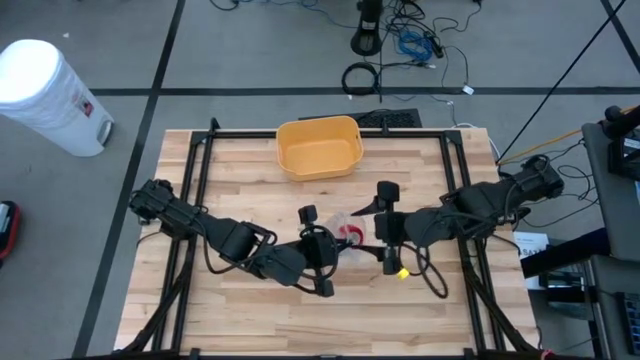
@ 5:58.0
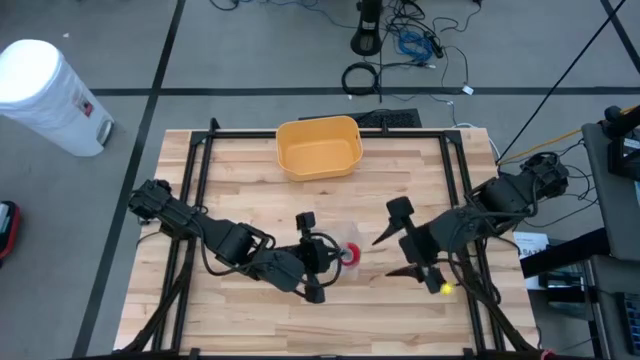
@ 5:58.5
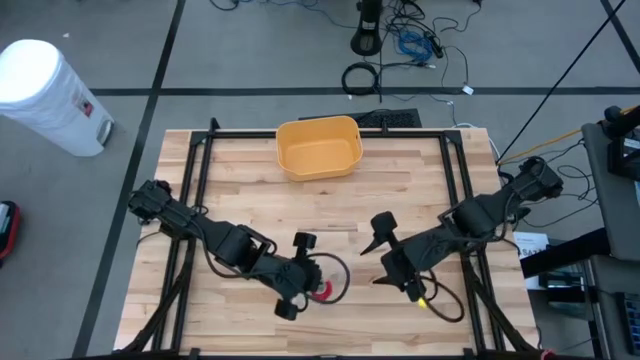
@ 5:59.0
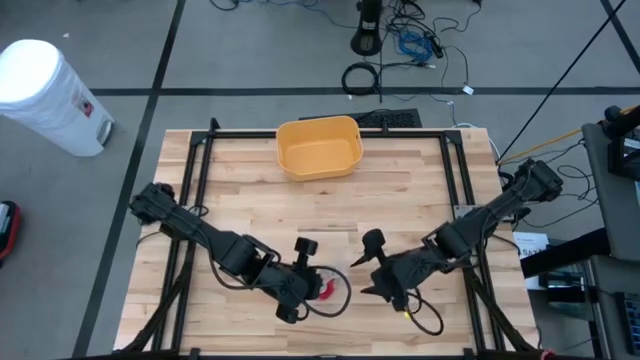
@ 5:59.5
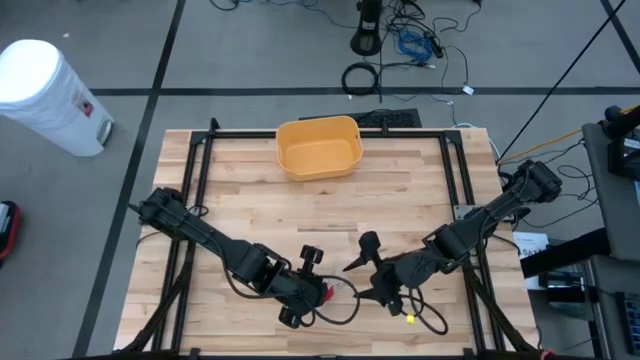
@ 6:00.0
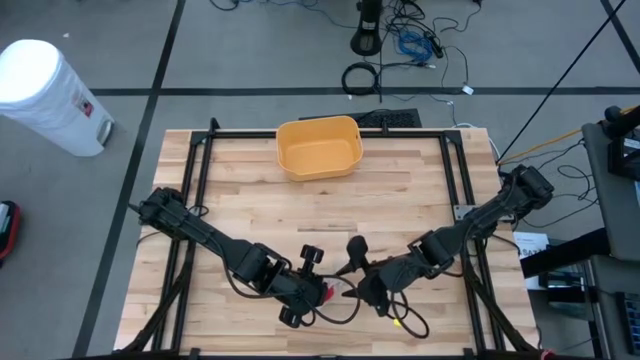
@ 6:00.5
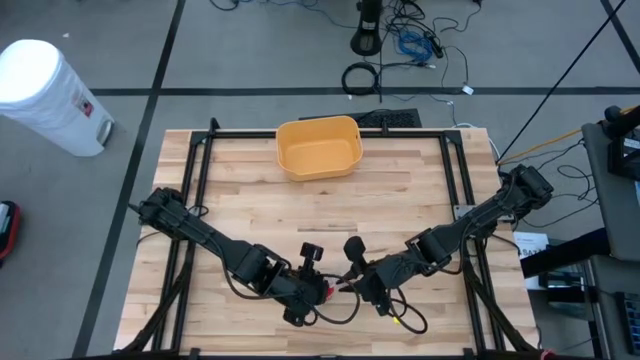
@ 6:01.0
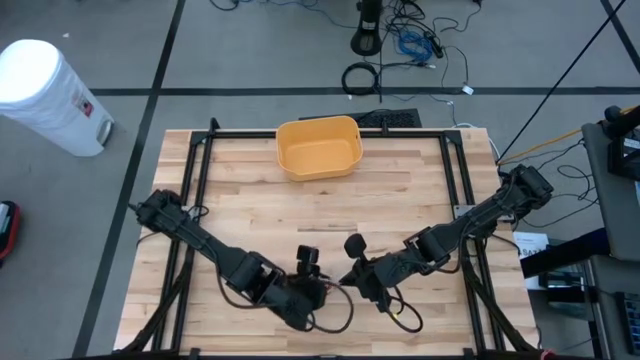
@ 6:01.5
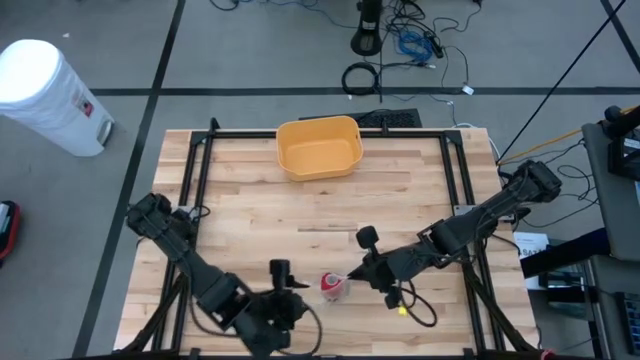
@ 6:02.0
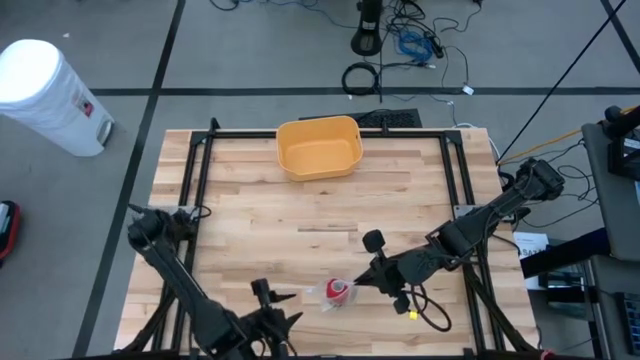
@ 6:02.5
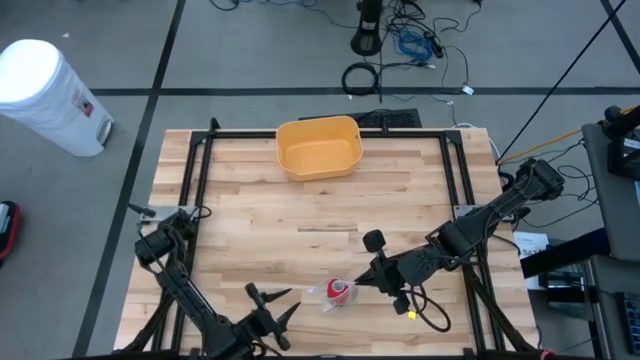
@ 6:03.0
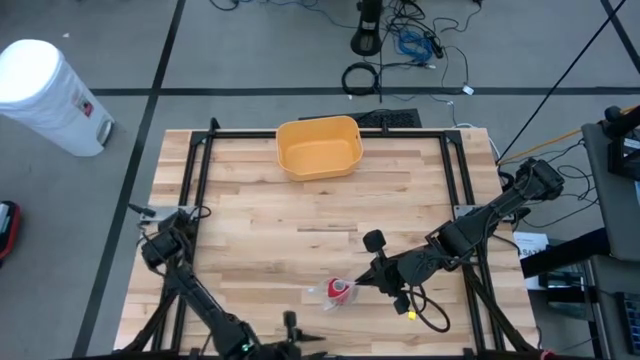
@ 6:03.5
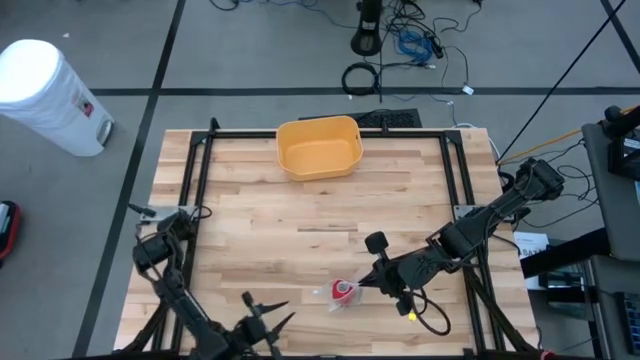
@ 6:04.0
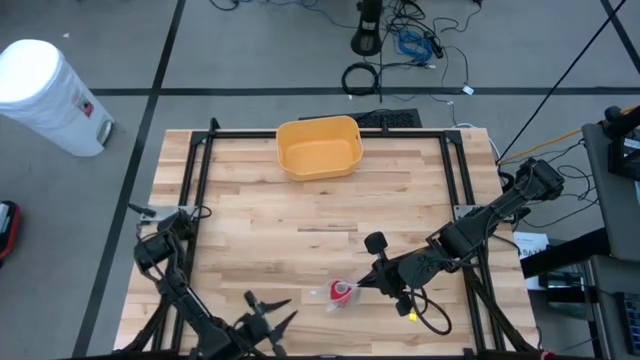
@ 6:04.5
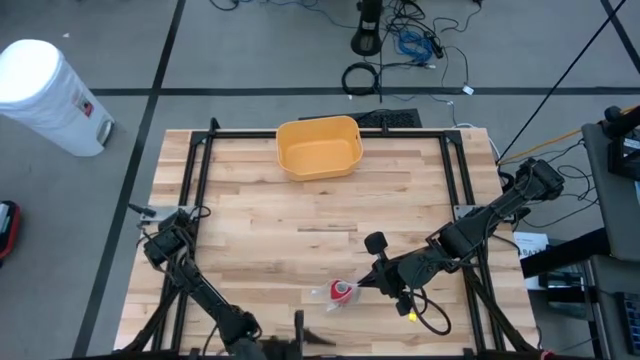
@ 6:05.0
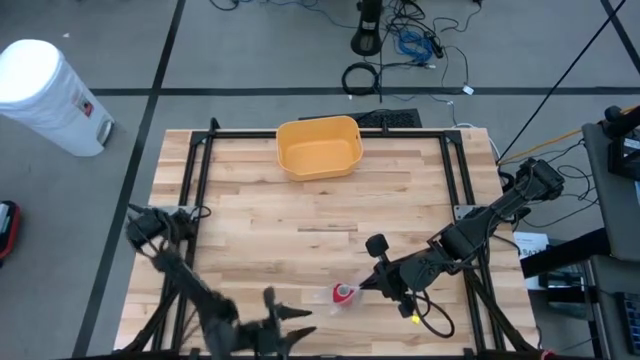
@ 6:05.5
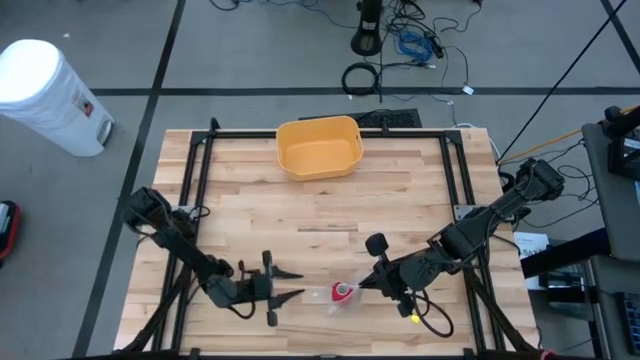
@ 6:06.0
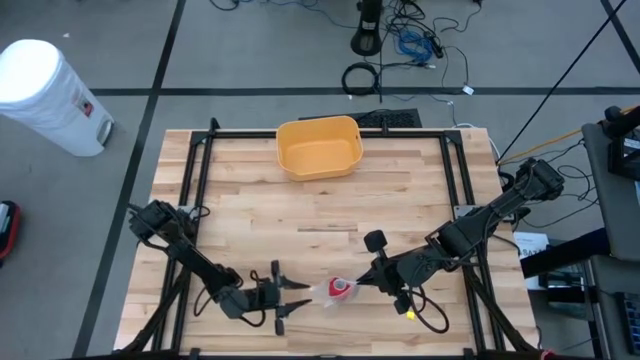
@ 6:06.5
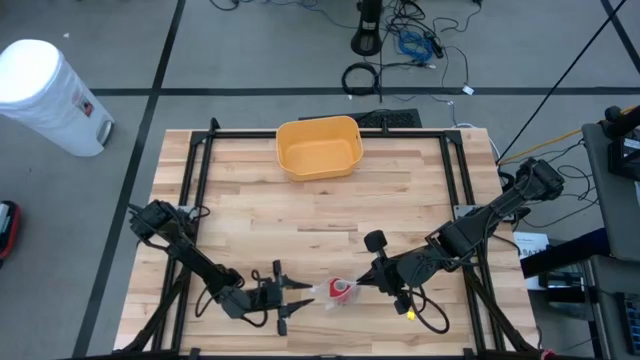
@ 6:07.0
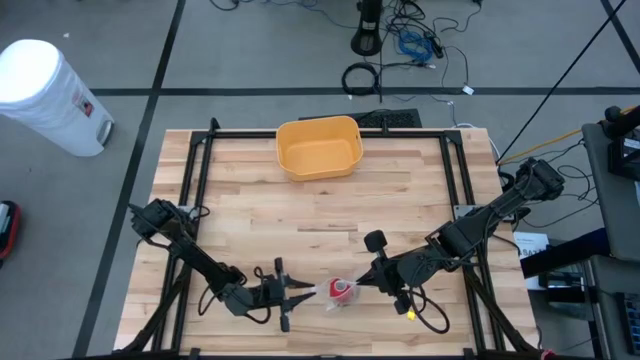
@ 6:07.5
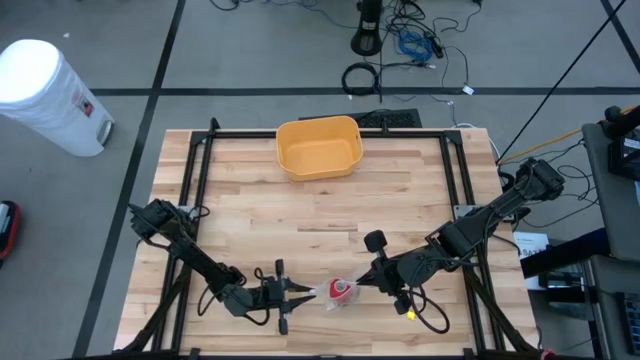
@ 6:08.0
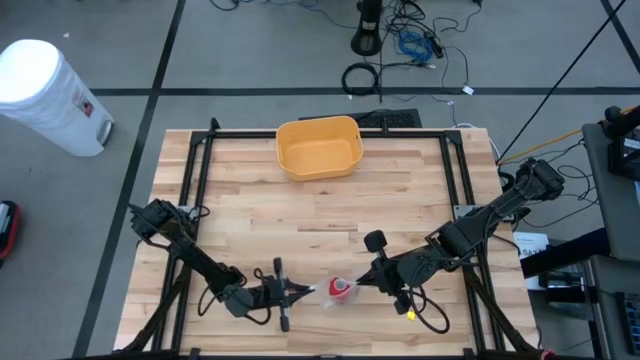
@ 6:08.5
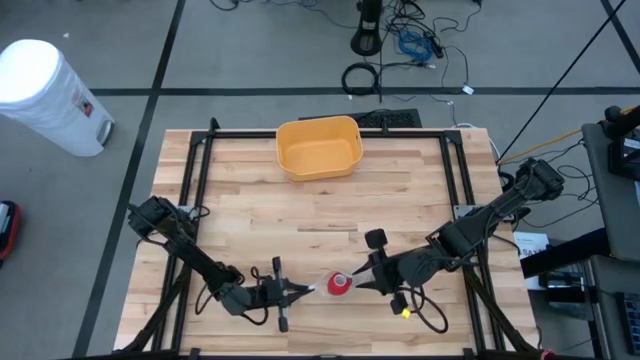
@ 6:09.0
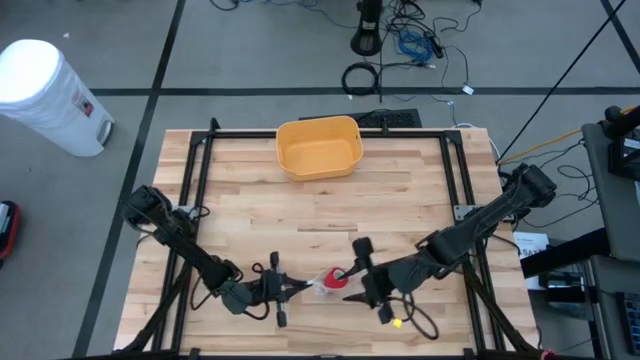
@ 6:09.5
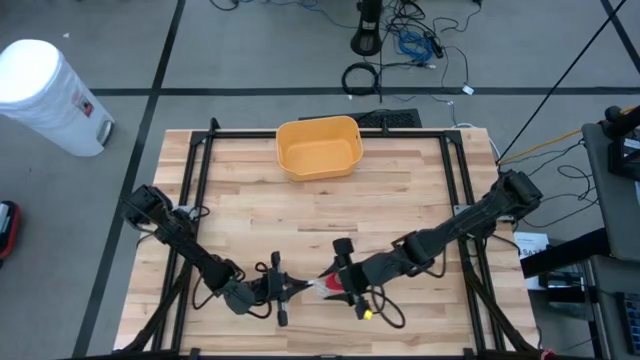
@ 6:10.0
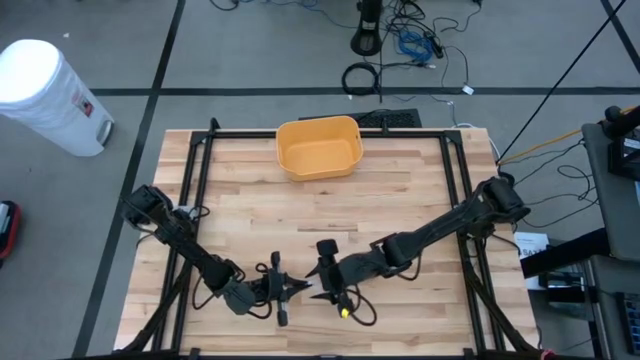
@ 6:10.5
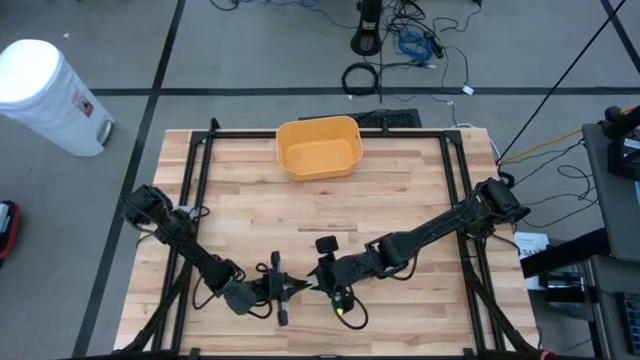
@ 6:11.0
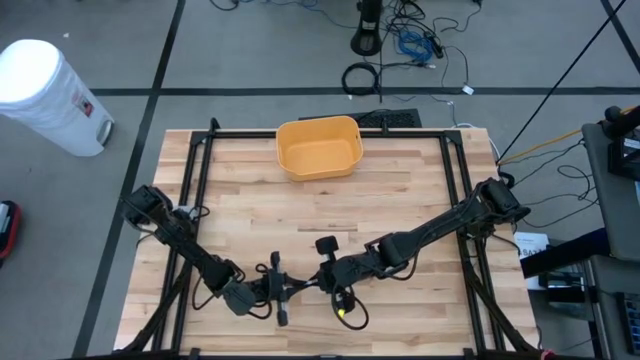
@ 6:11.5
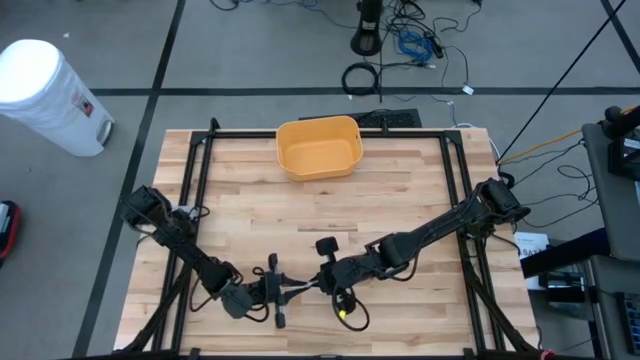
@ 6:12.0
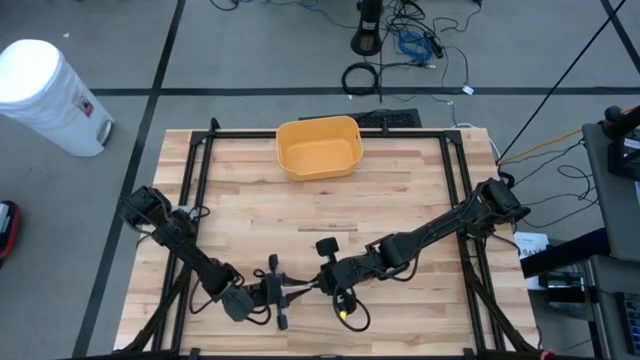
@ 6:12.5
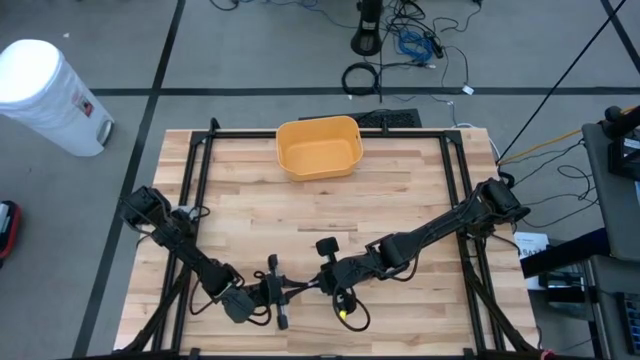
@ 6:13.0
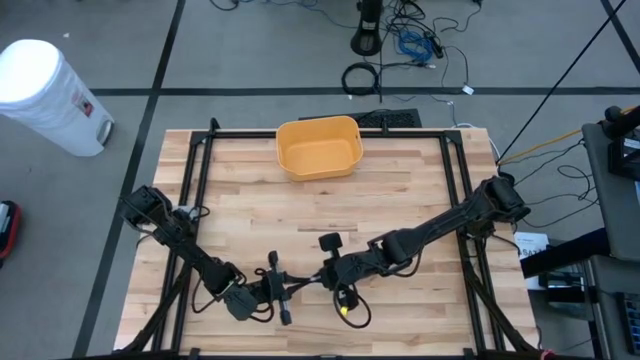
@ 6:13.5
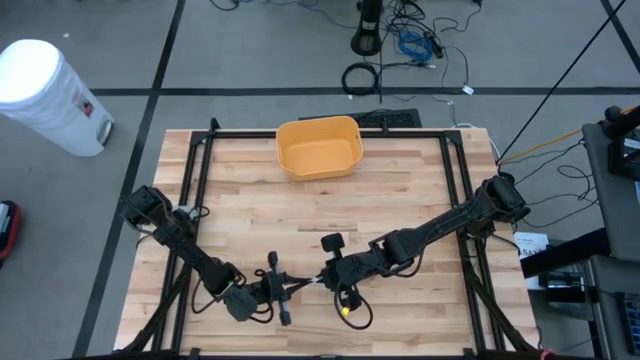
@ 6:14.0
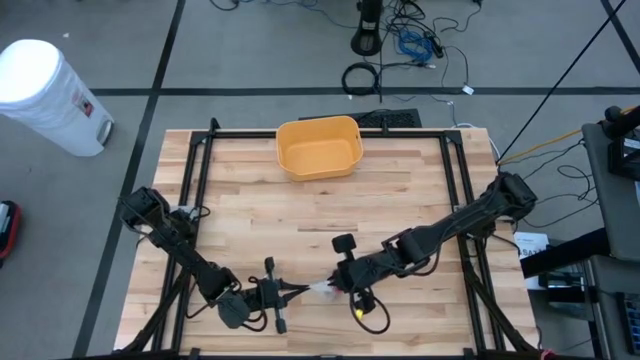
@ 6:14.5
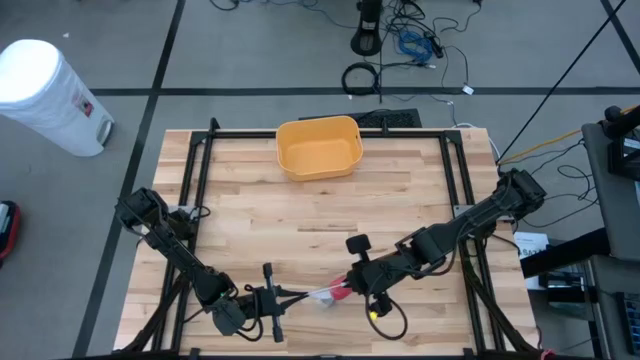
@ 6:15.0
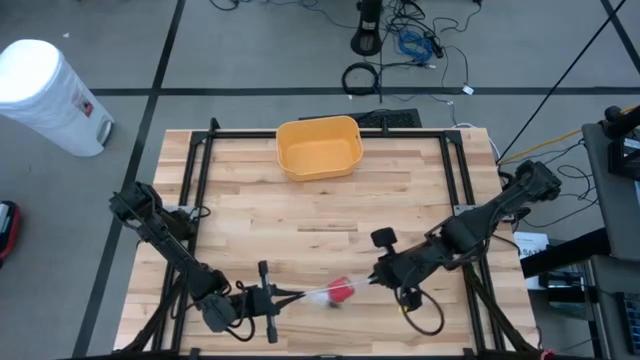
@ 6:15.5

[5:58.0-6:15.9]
Task: Roll bandage
Close the transparent zip bag

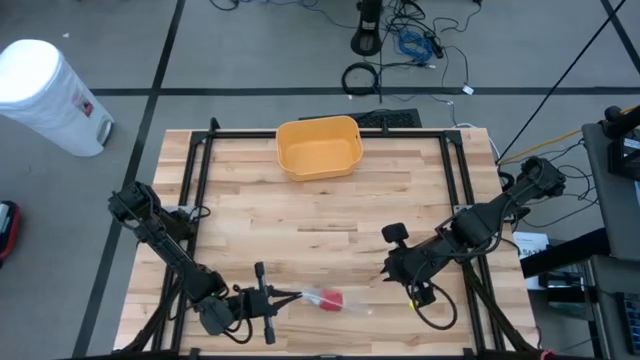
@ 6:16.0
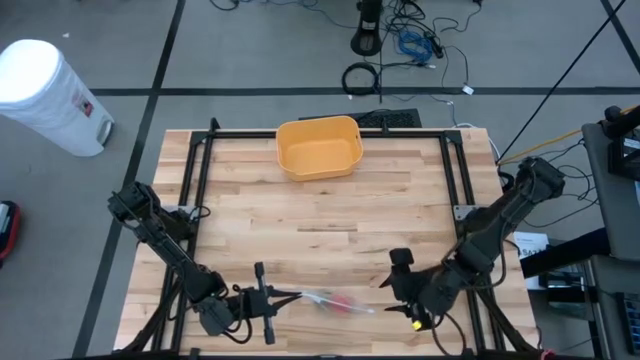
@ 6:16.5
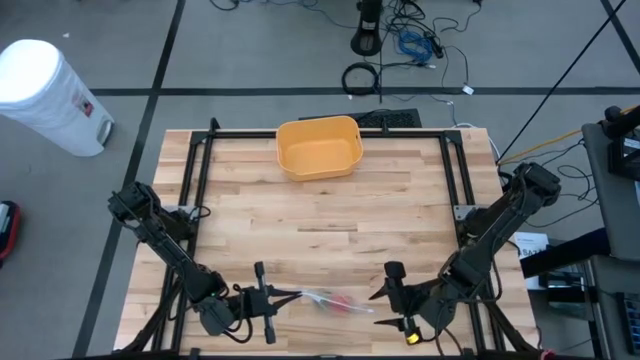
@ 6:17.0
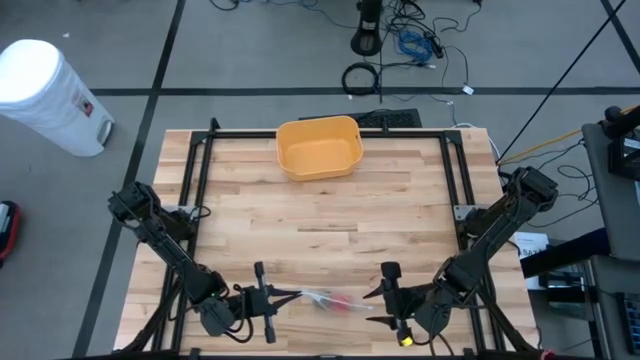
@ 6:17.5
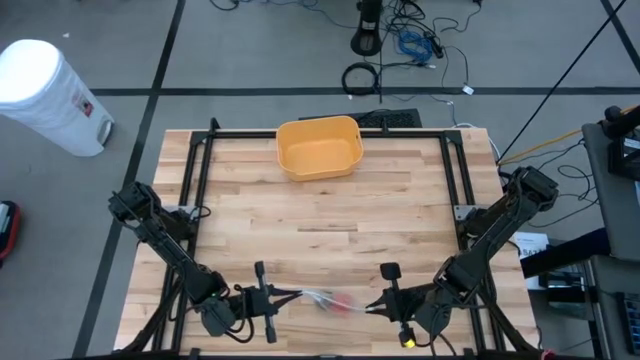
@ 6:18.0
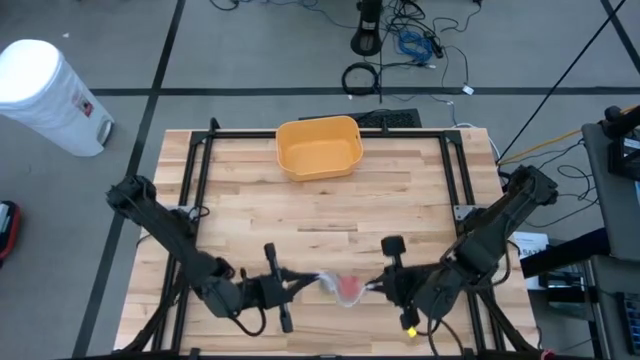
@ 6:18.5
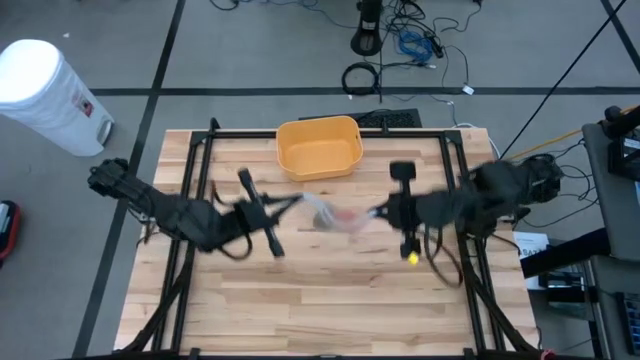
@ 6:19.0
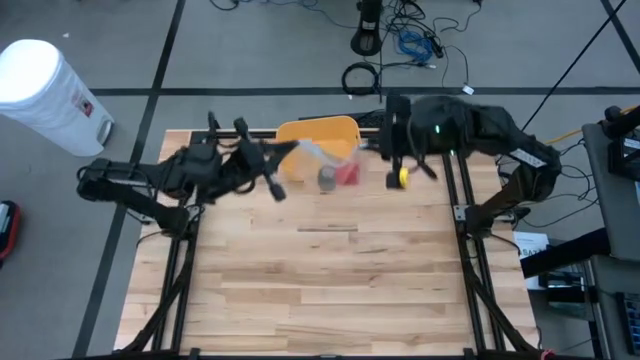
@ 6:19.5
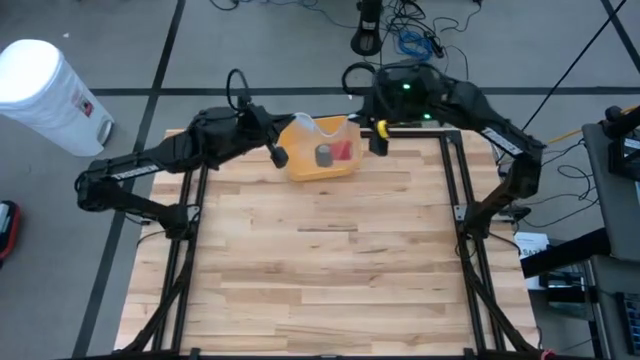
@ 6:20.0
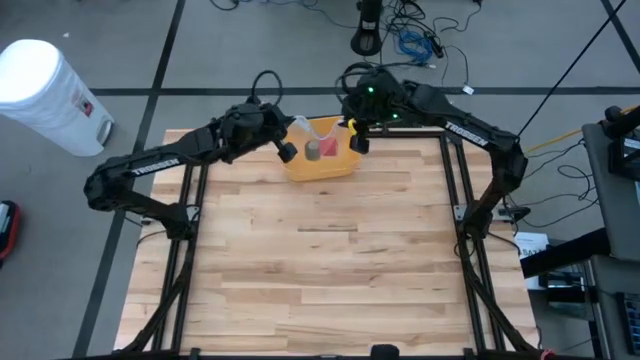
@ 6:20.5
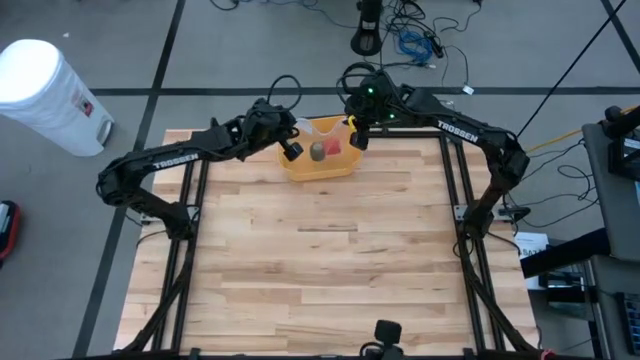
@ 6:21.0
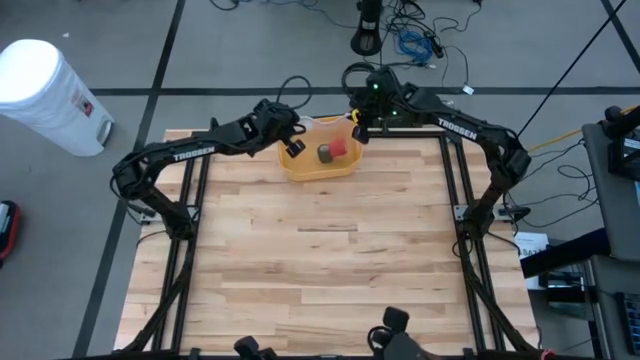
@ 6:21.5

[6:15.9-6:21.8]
Put the transparent zip bag containing the green and red rolled bandages into the yellow bin
